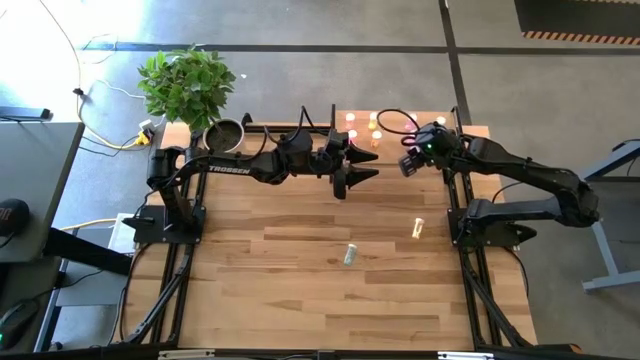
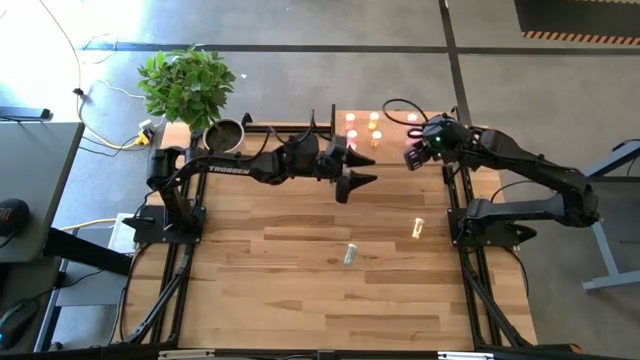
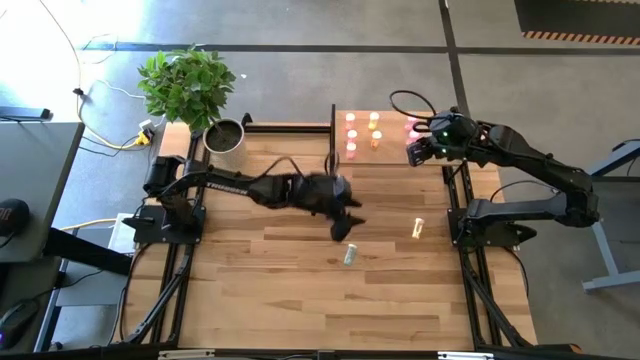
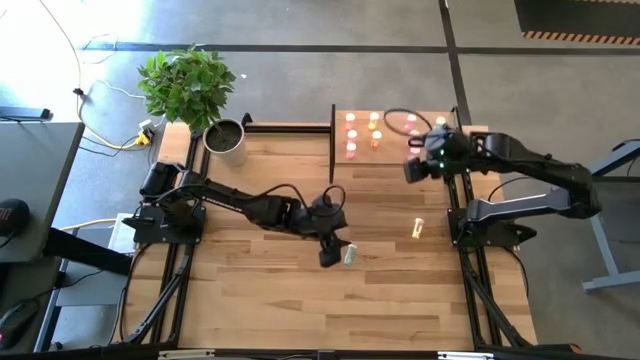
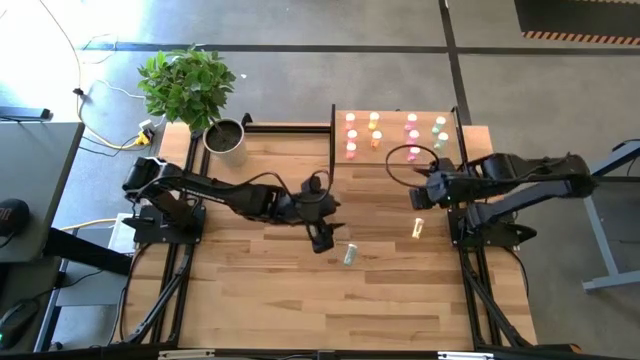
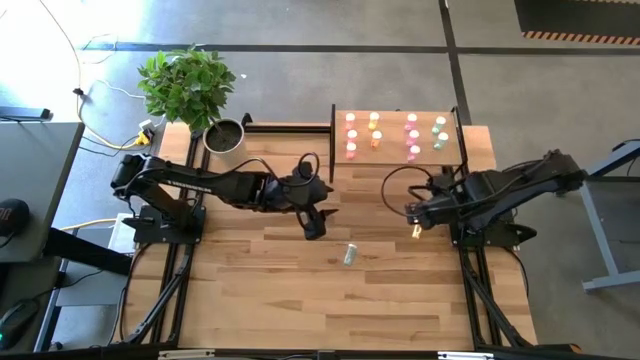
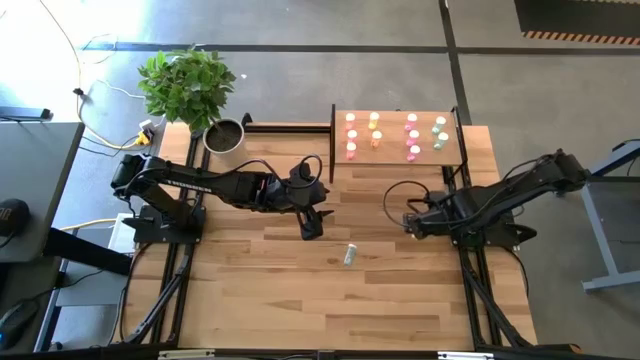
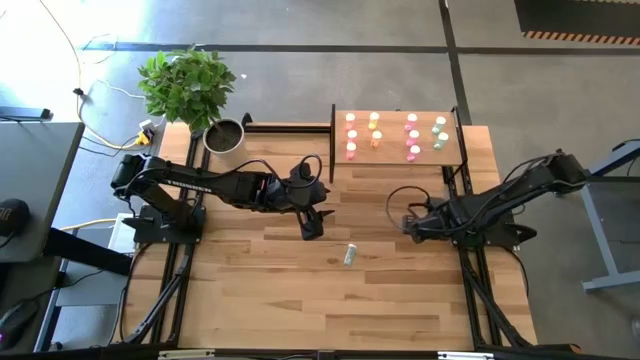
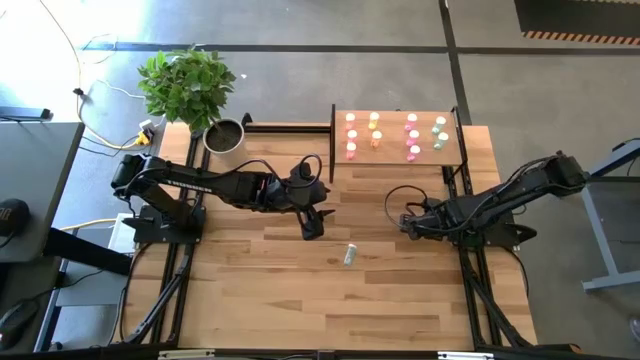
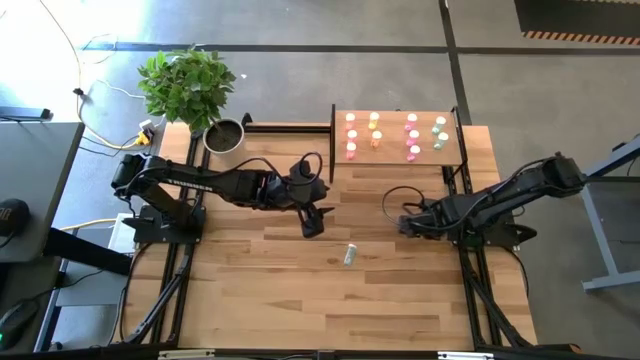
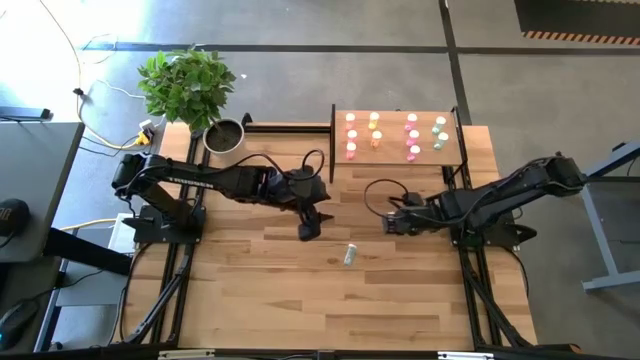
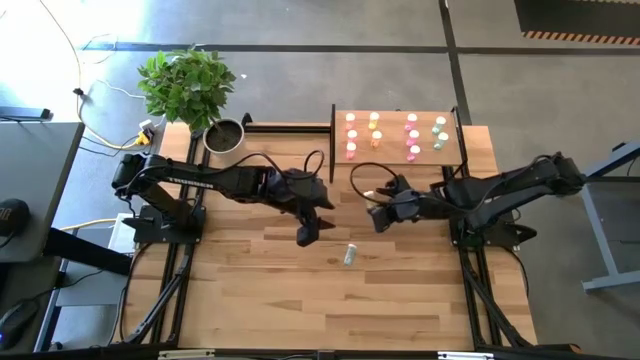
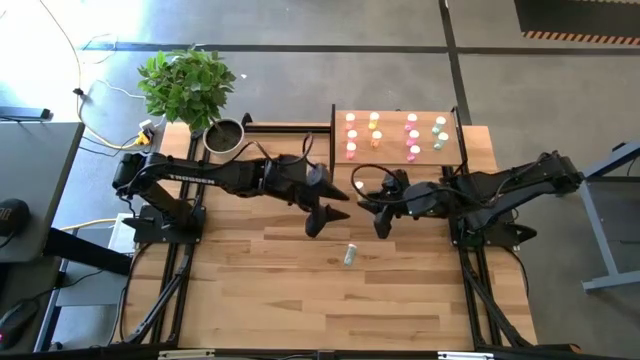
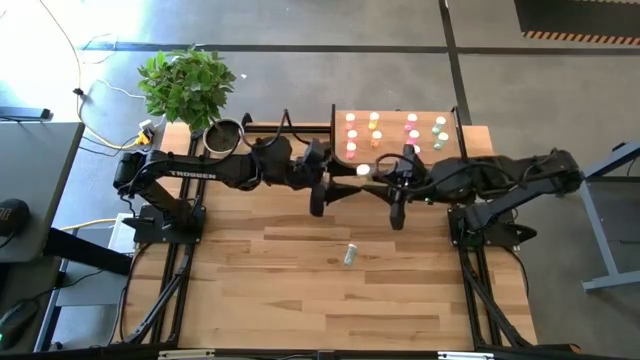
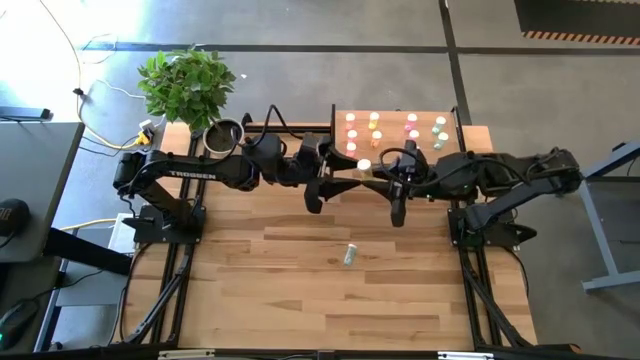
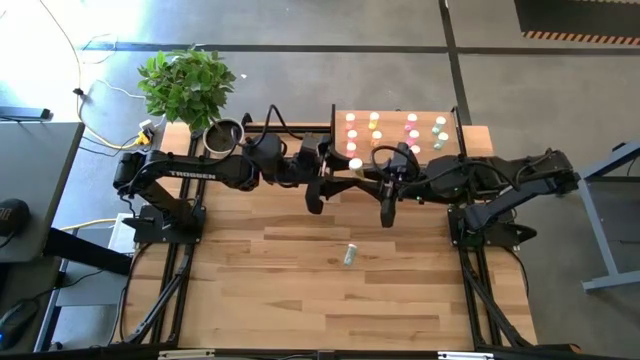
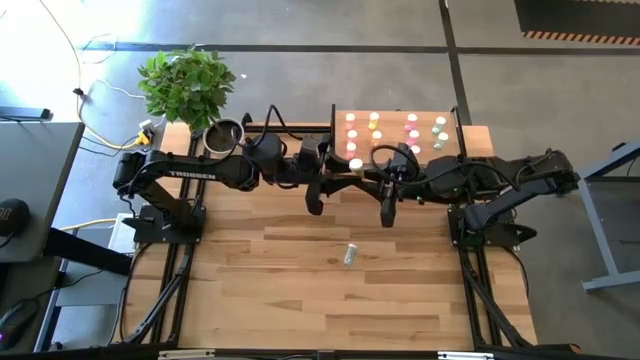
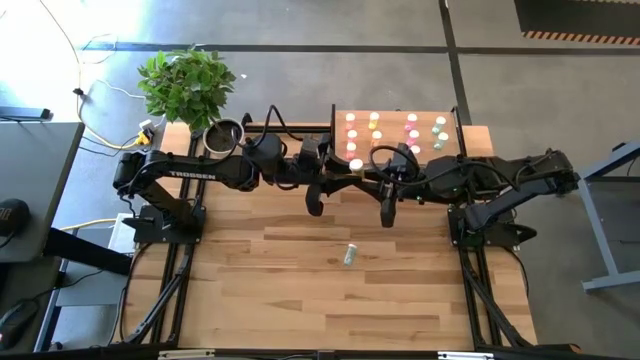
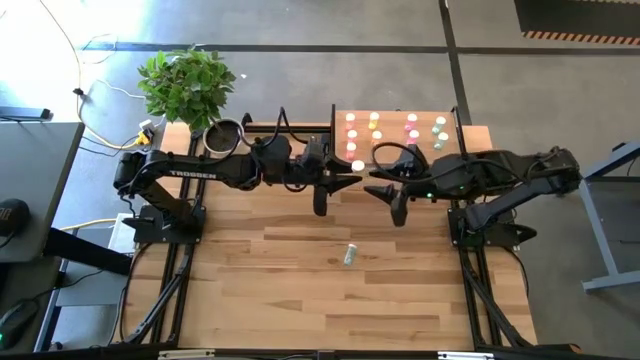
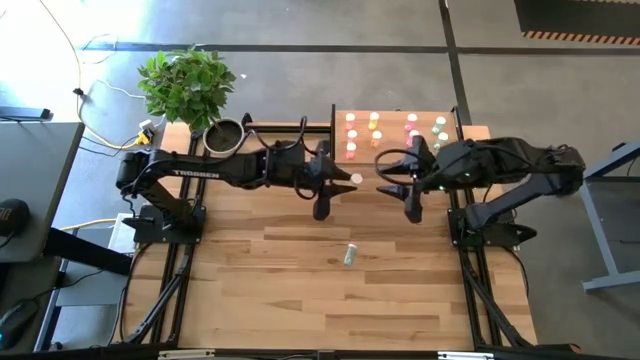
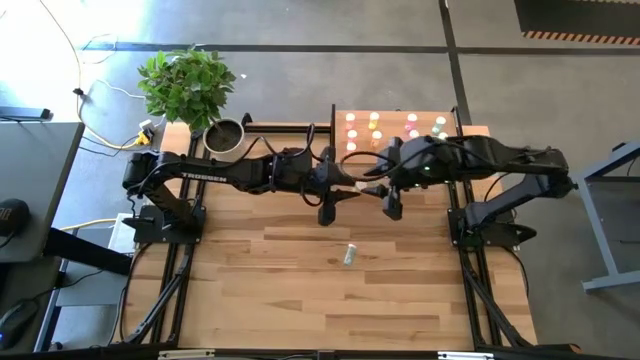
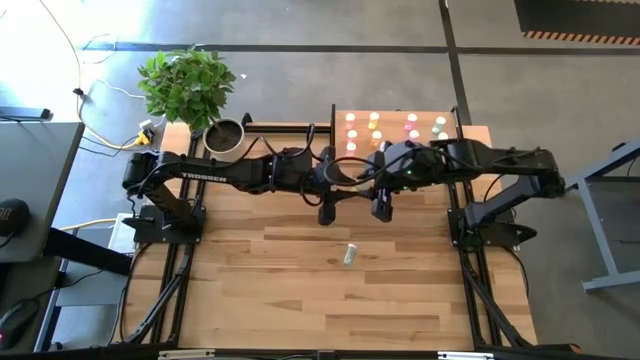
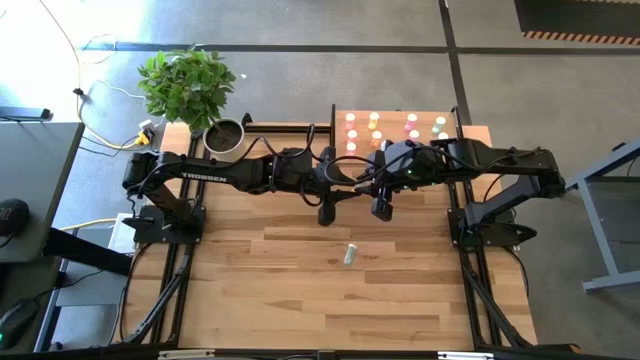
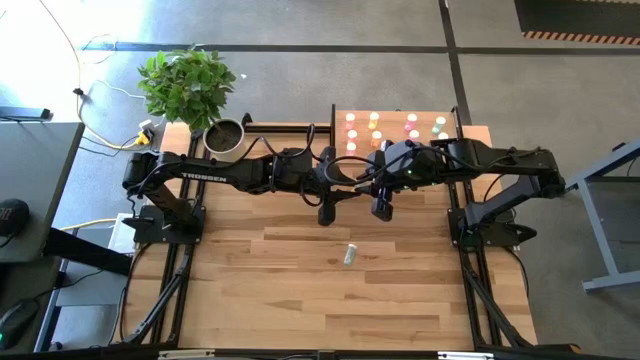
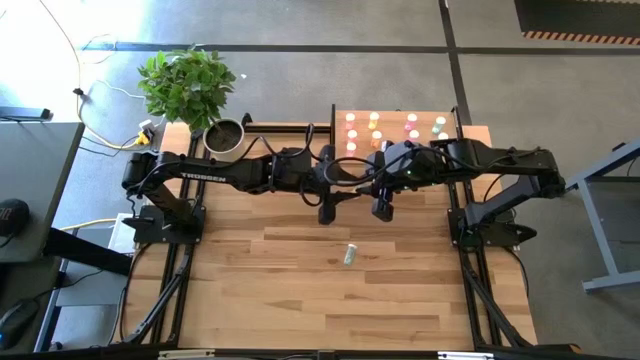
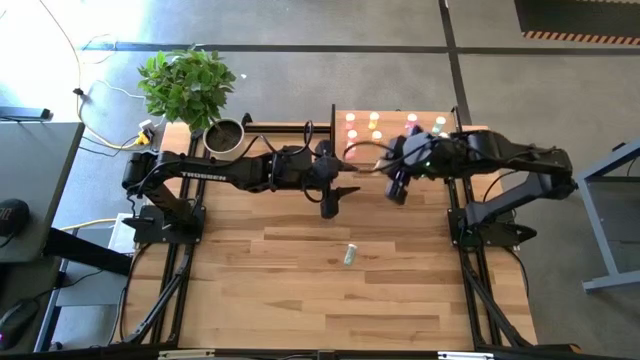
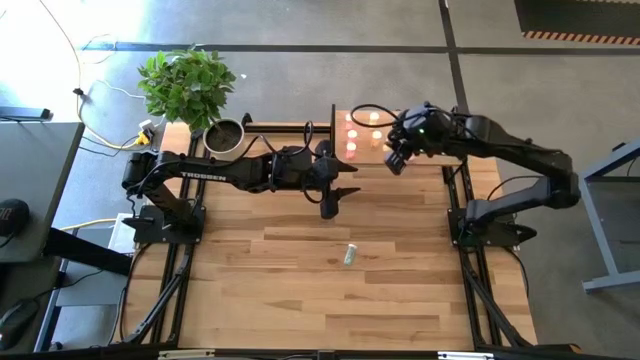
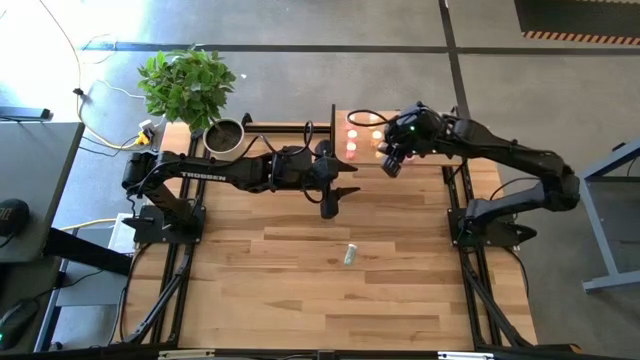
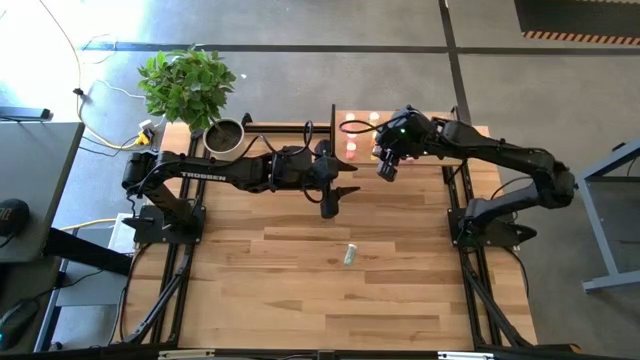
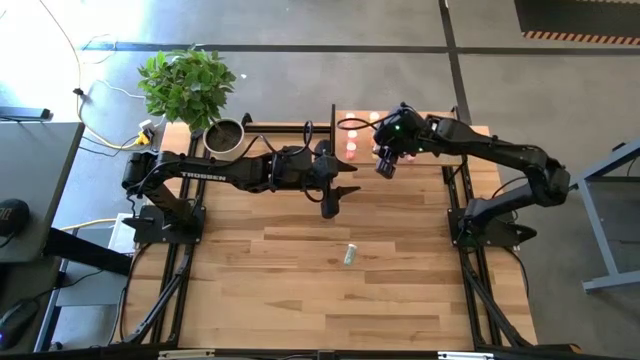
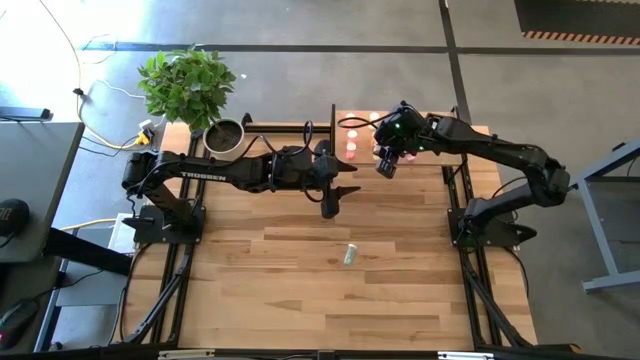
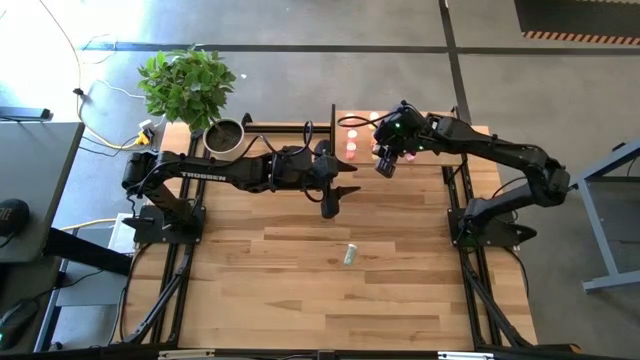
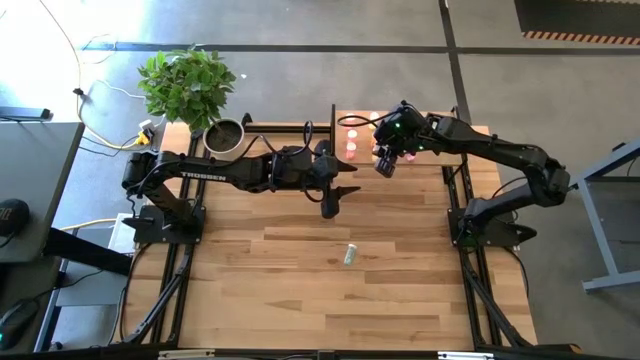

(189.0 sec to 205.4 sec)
Task: Pick and place medicine bottles onto shelf by color
Put the yellow medicine bottle aligned with the other yellow medicine bottles on the shelf

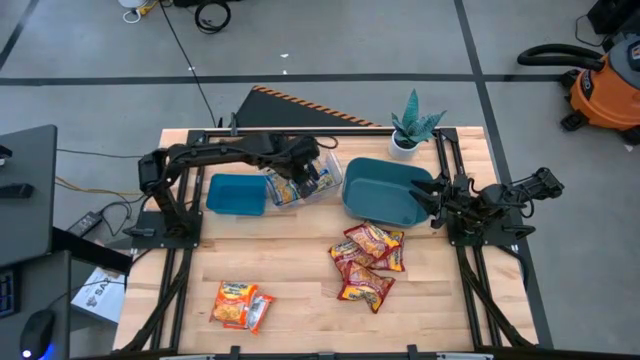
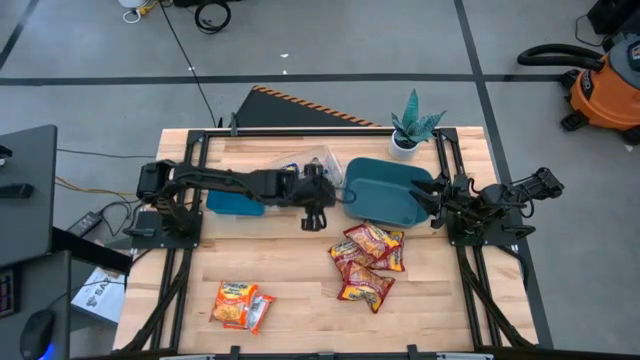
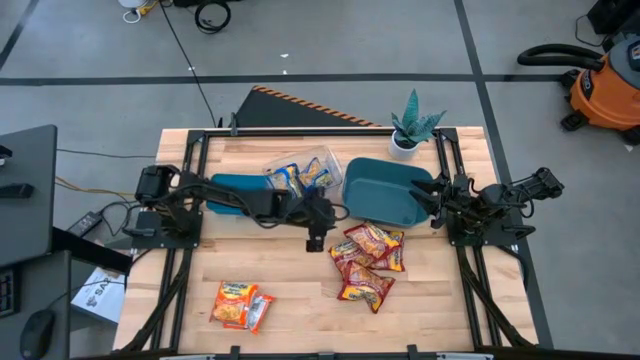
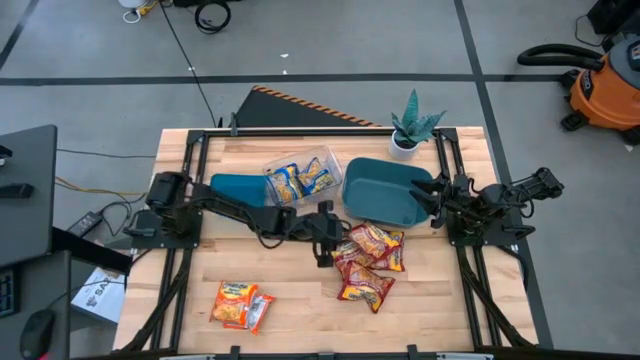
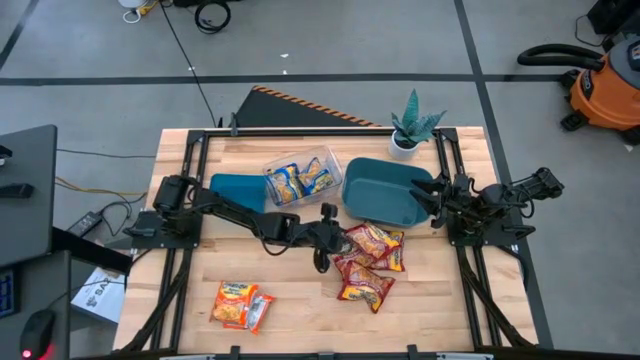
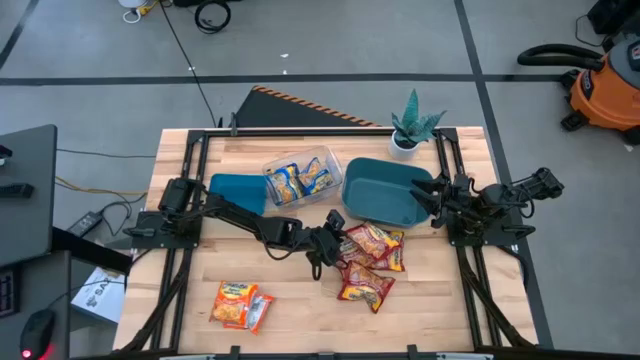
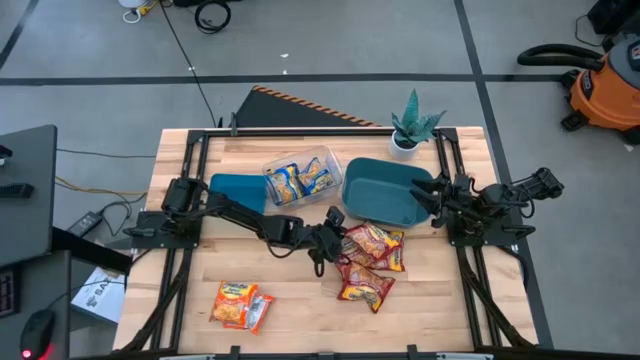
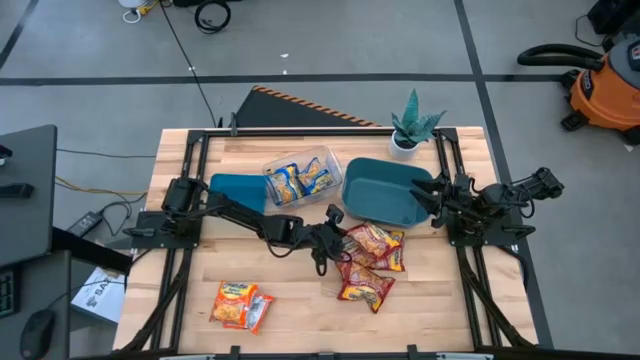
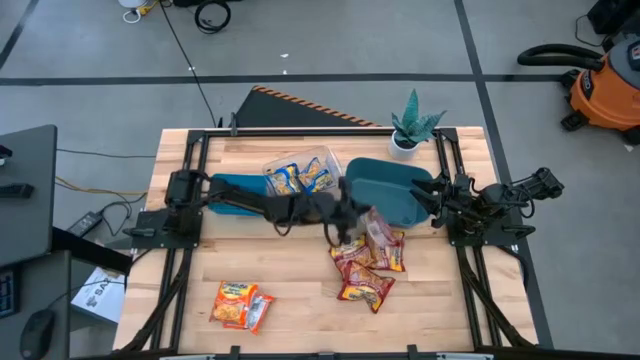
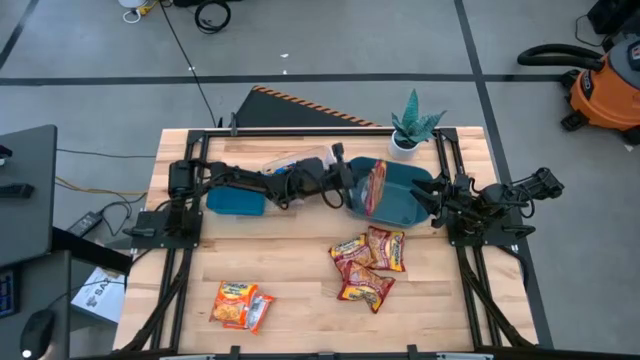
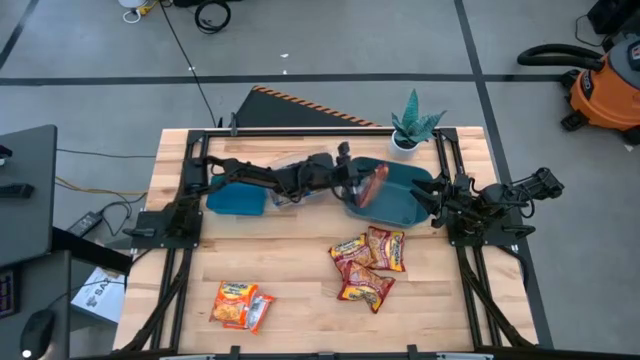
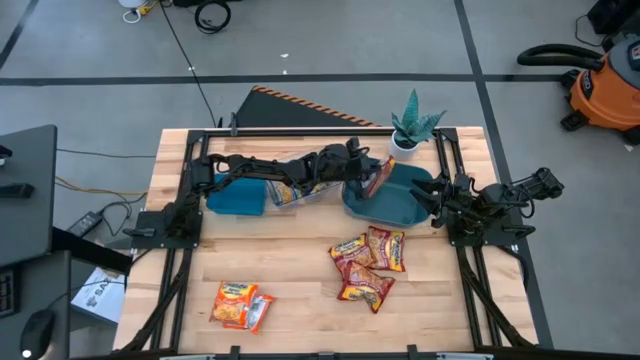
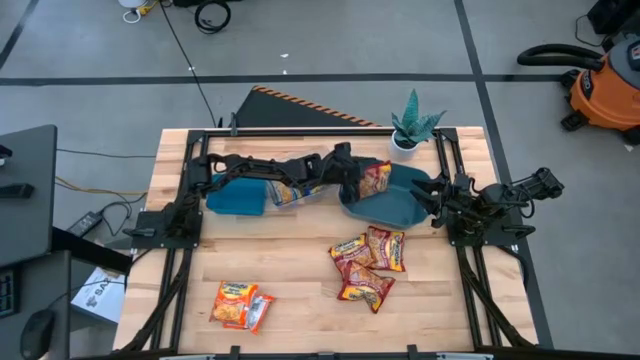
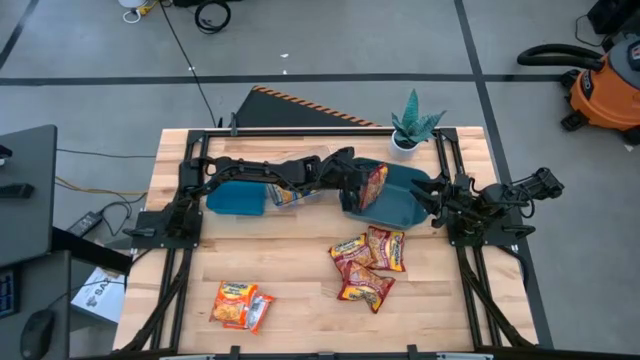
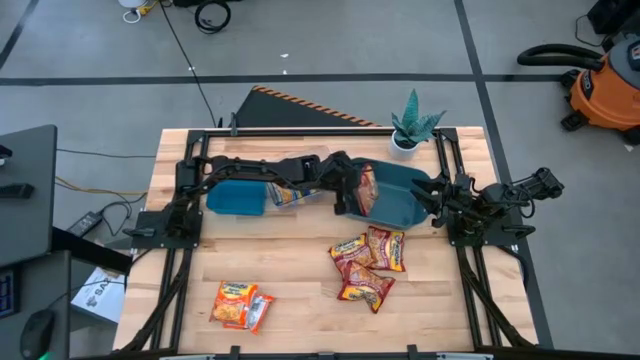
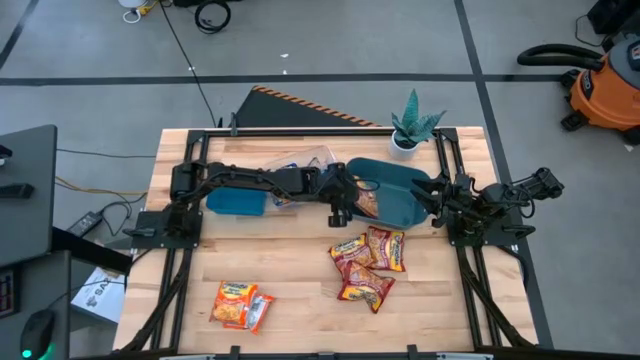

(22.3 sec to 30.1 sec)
Task: Sort Maruchan noodles
Put the red noodle pack into the green bin
